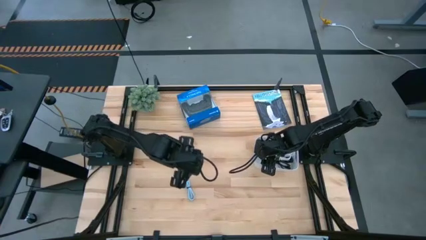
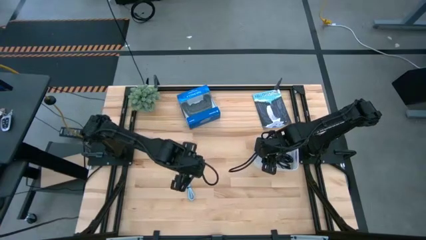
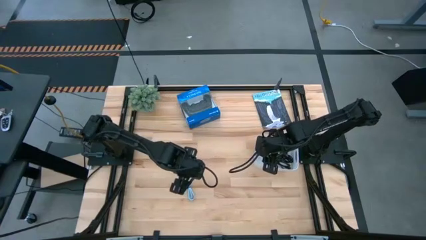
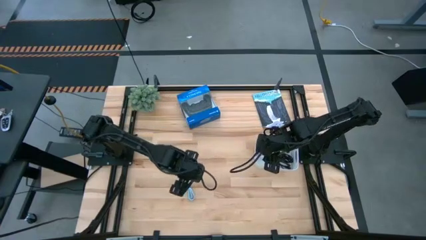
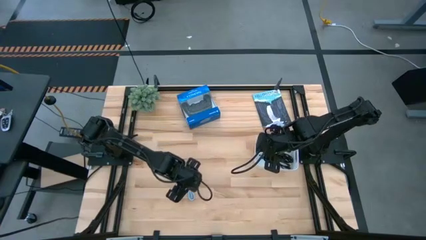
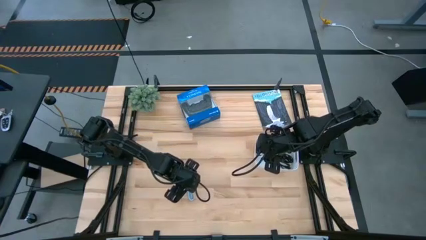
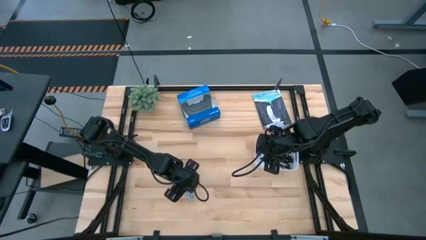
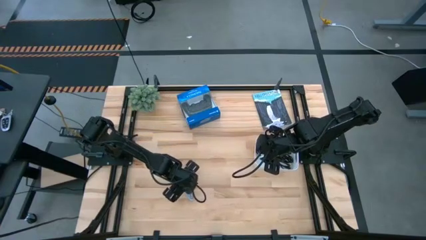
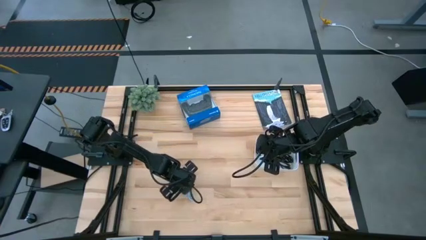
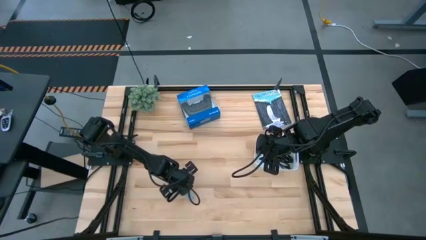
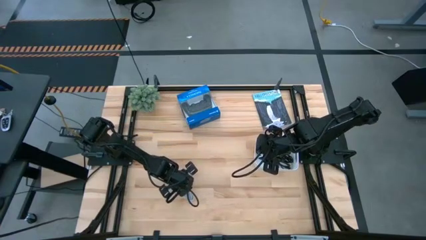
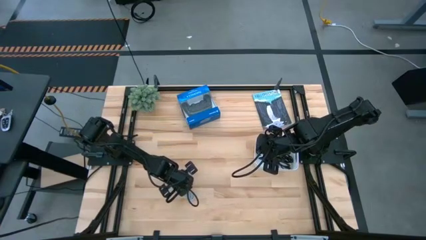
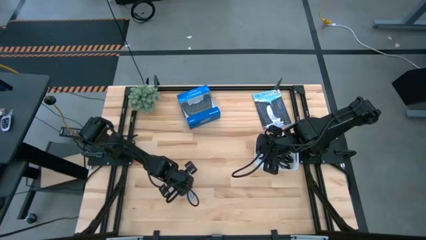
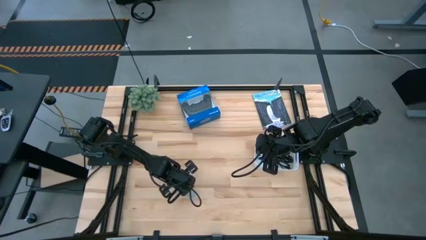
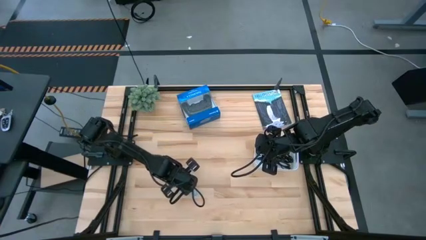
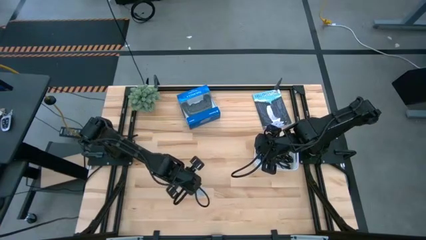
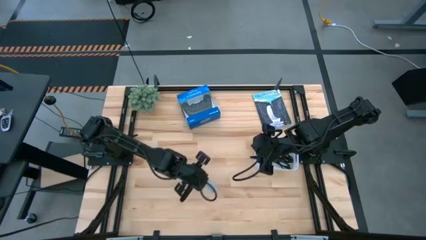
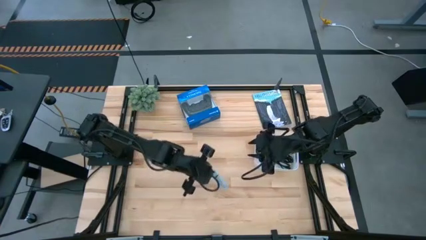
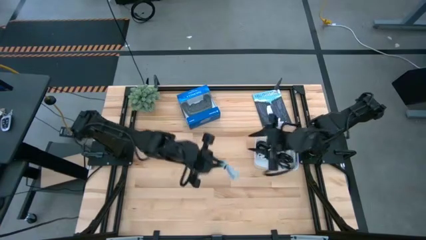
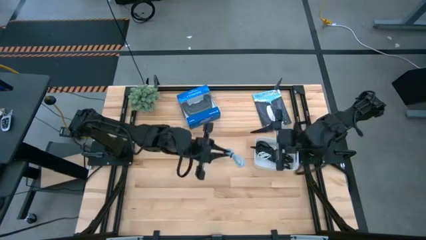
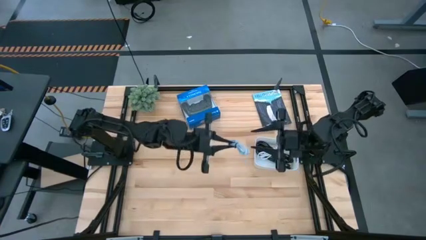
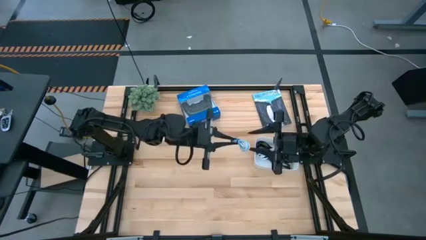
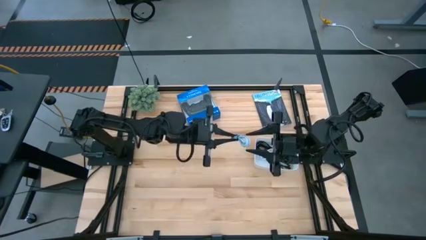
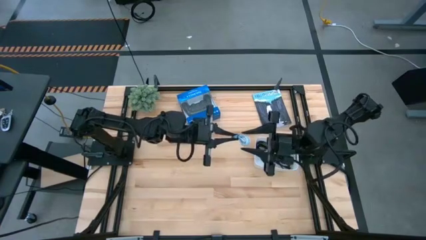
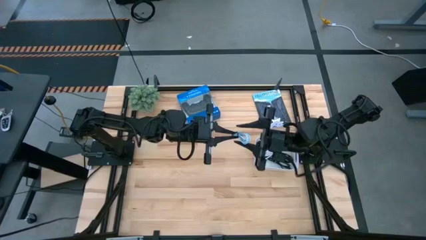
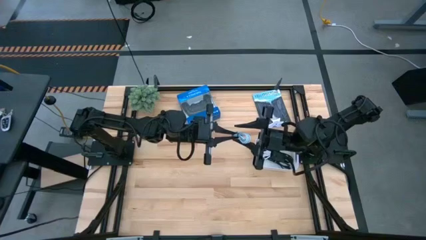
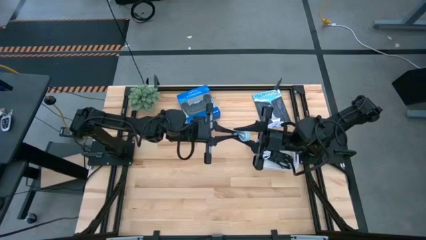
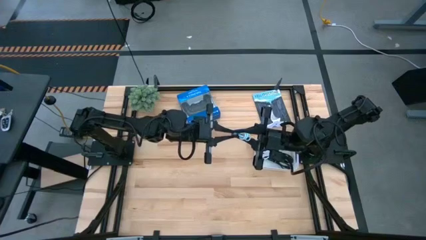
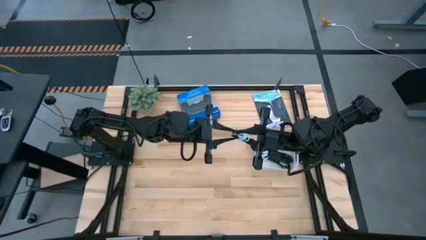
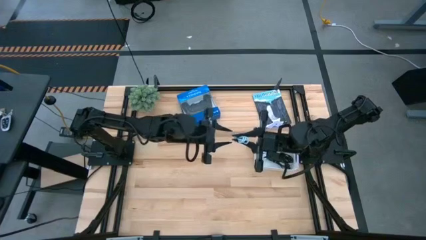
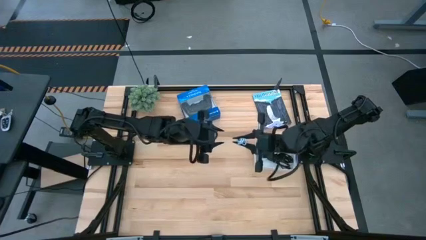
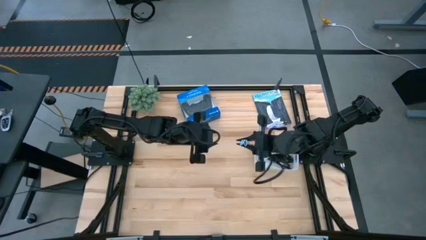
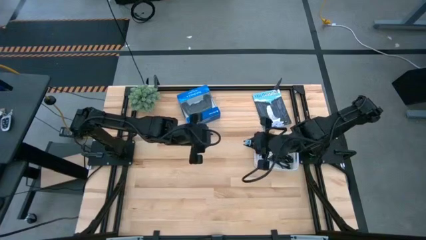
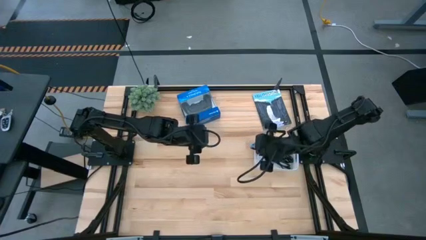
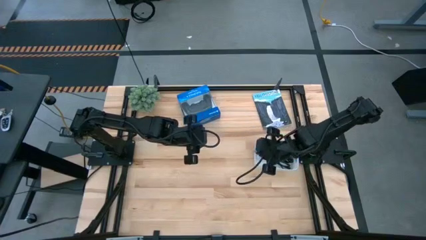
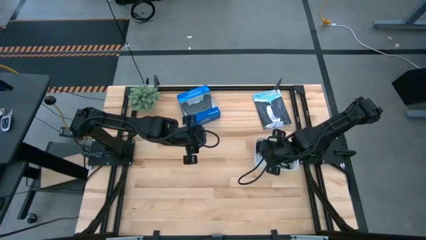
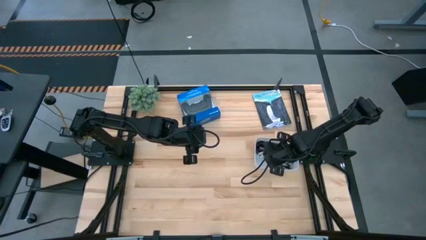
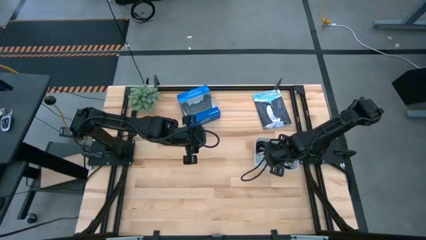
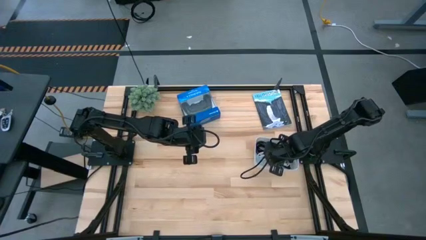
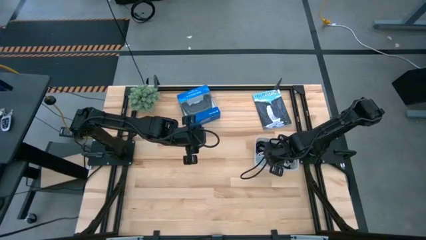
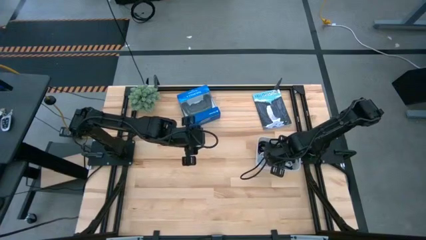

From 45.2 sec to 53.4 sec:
Task: Pick and place USB-C Cables
Put the light blue USB cable into the white bin

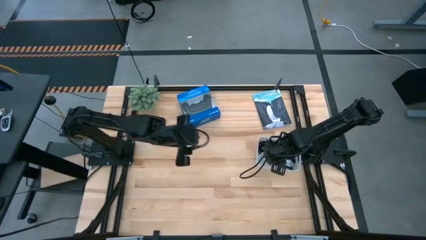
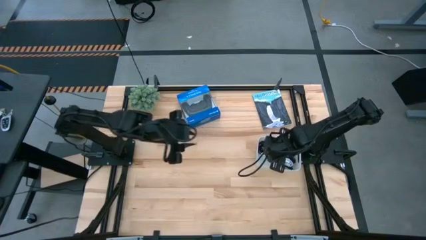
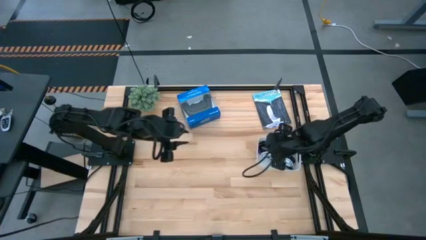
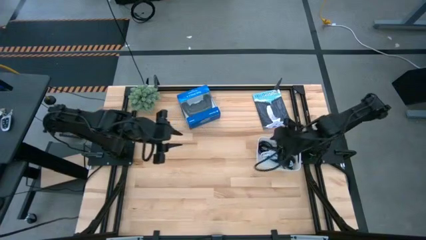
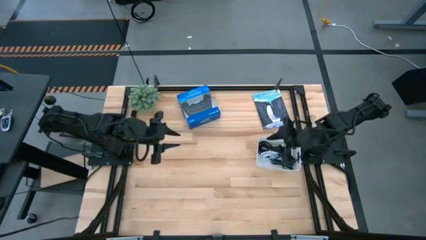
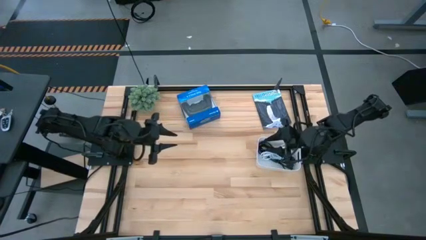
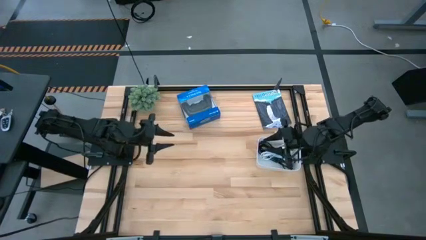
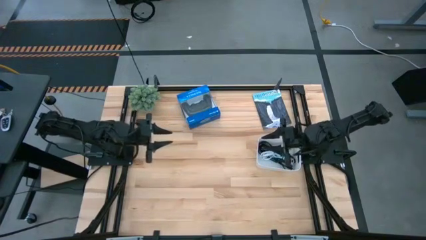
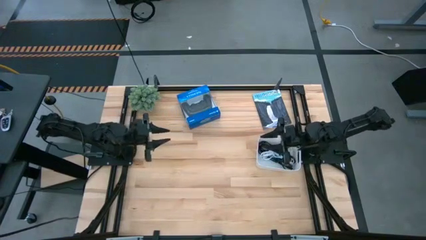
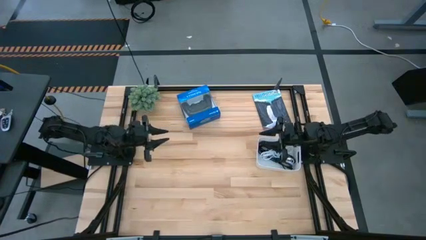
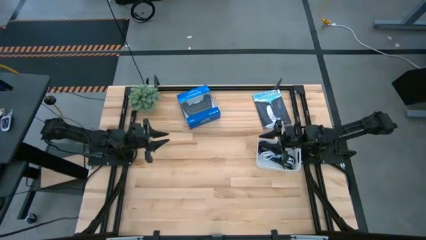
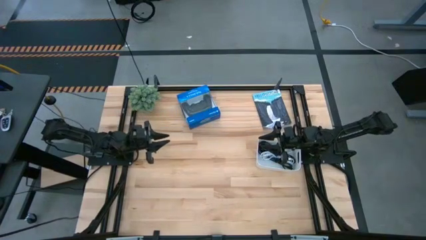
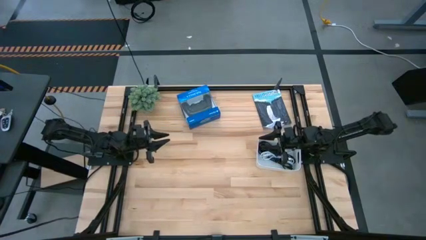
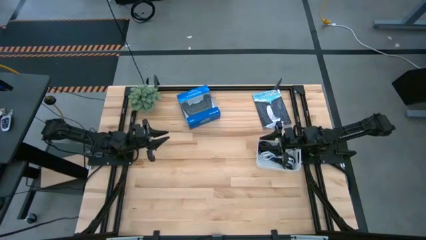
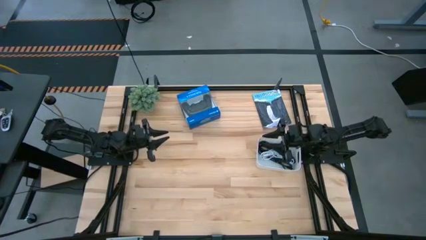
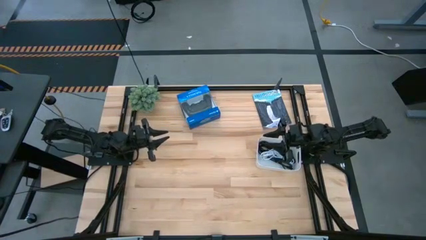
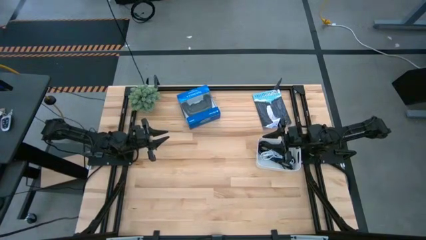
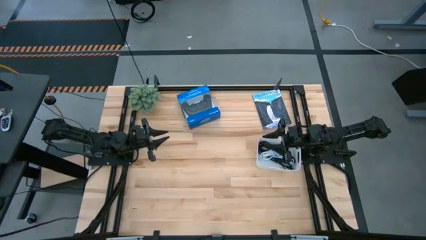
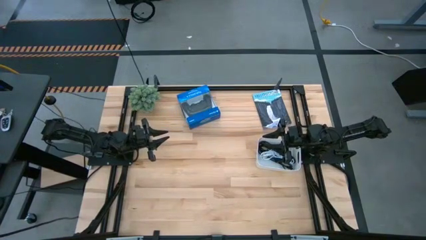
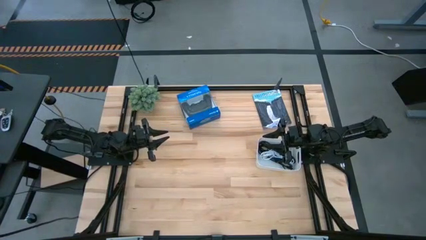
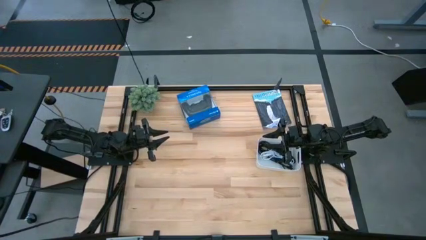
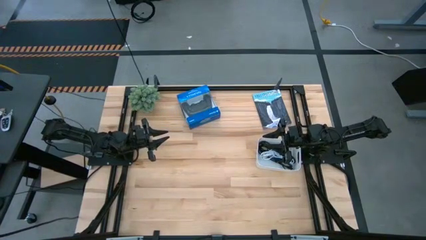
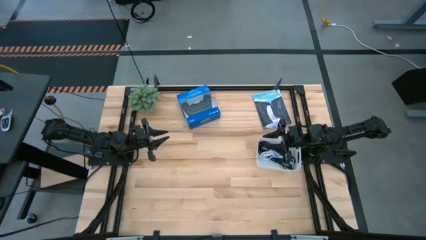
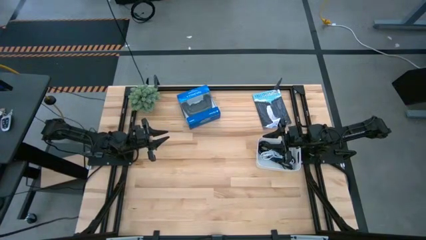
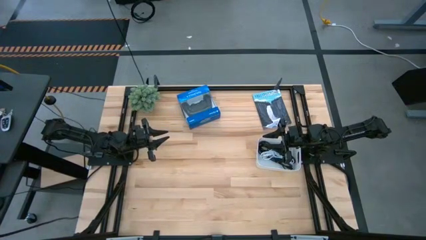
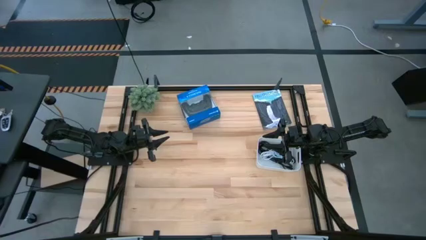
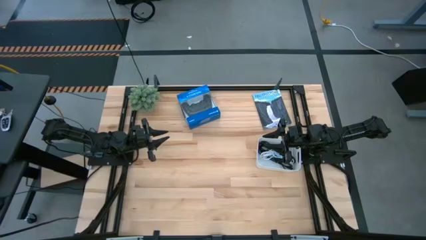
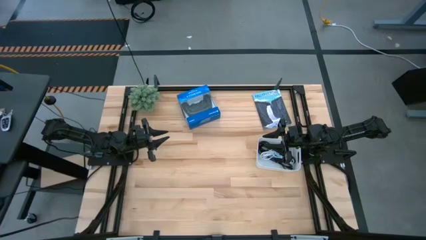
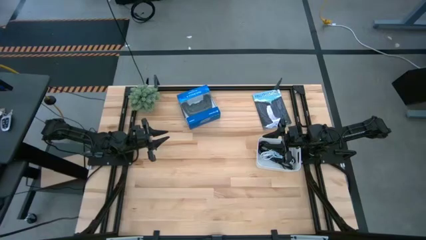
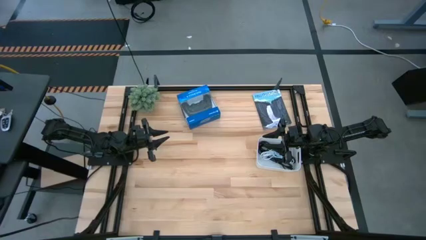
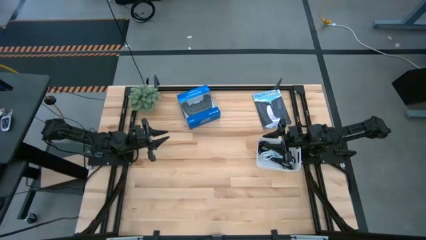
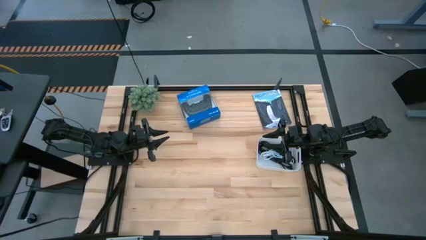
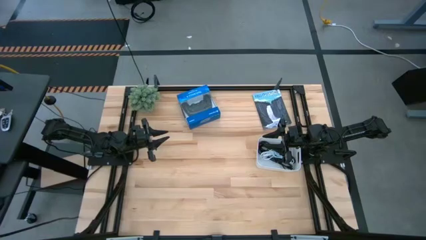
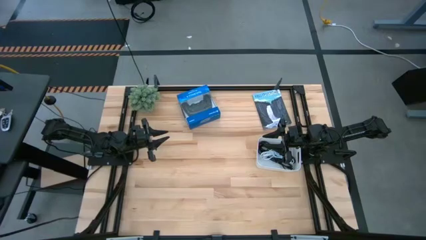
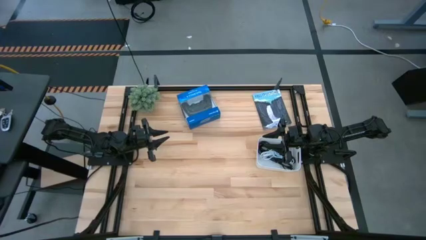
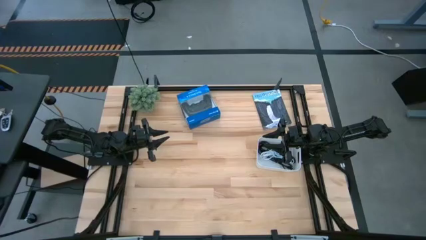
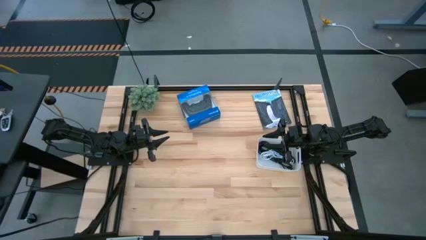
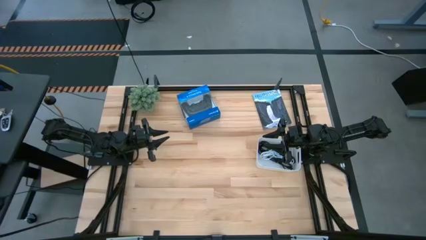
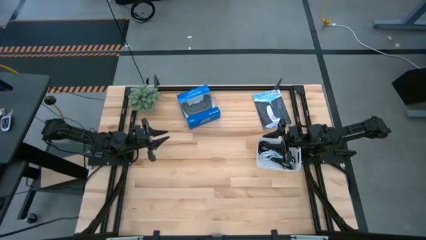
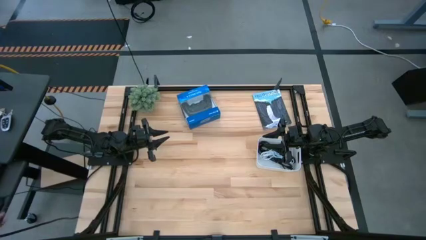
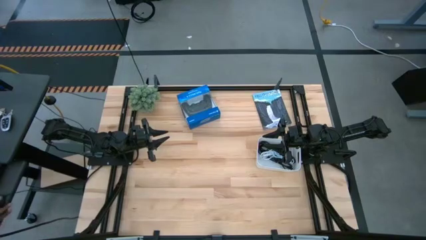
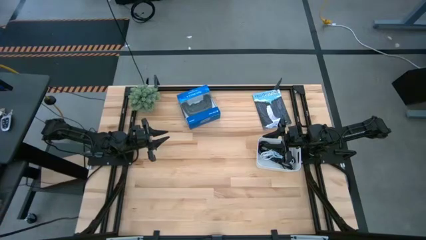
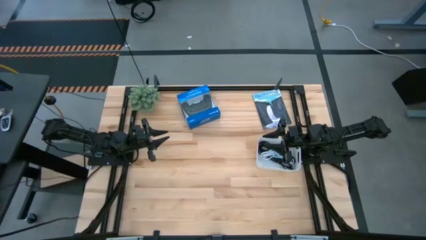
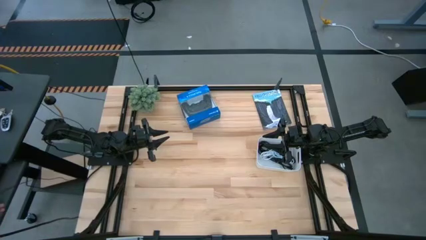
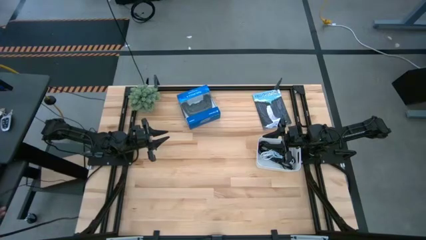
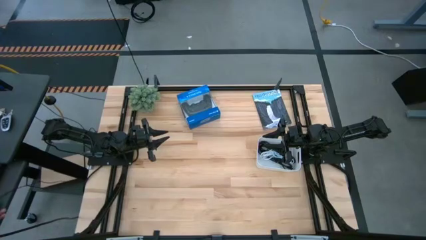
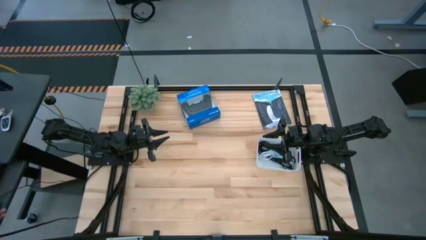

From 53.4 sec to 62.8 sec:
Return to Home Position
